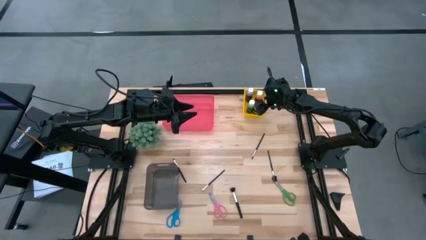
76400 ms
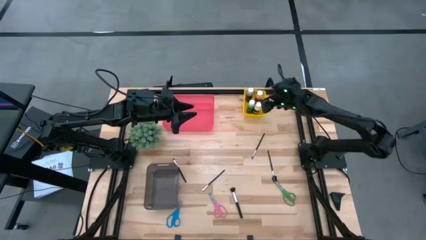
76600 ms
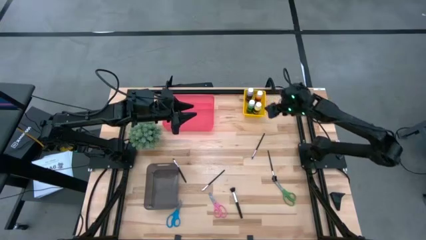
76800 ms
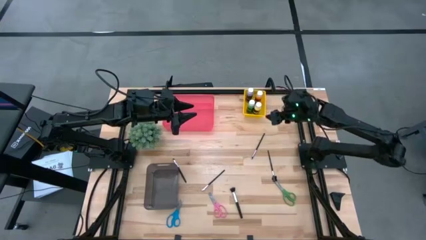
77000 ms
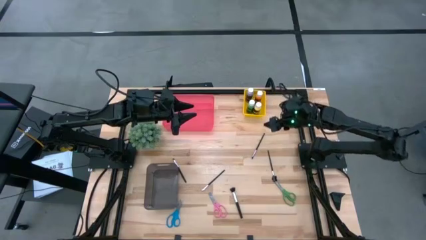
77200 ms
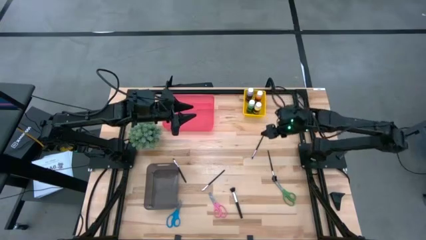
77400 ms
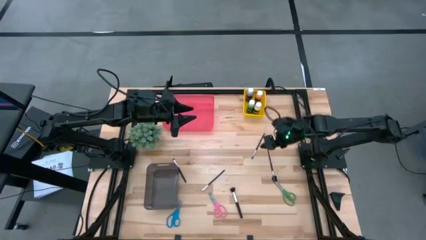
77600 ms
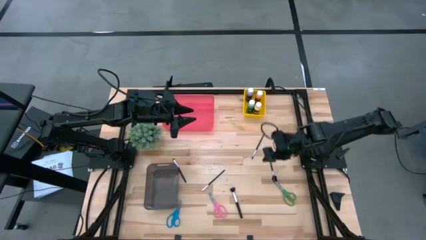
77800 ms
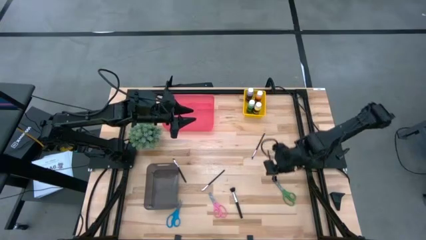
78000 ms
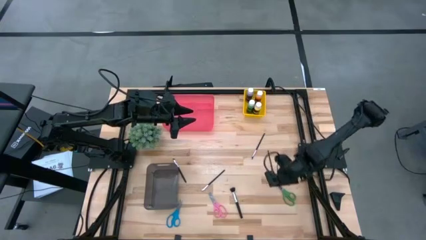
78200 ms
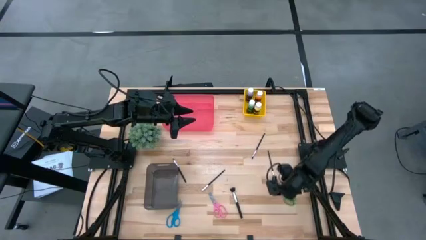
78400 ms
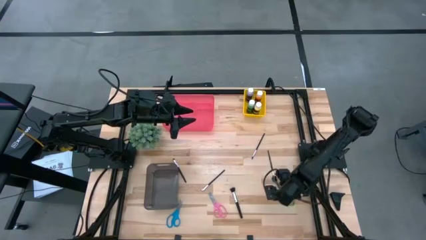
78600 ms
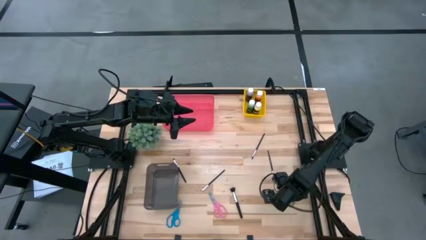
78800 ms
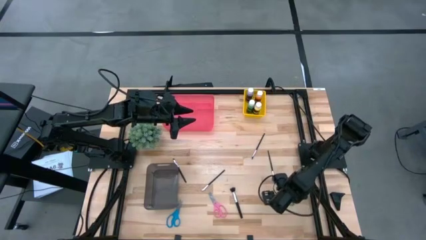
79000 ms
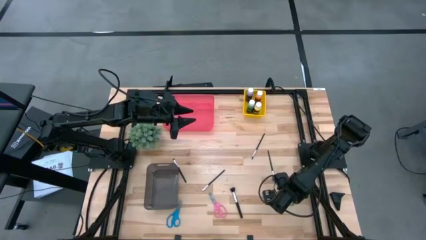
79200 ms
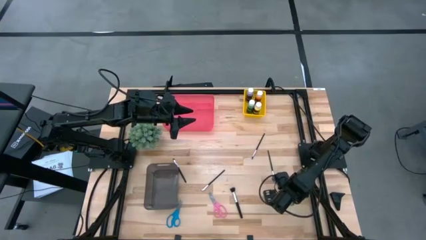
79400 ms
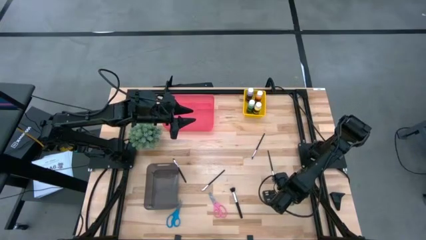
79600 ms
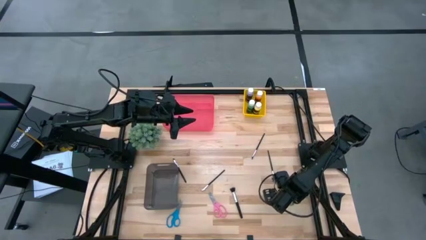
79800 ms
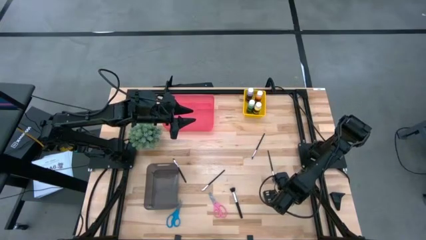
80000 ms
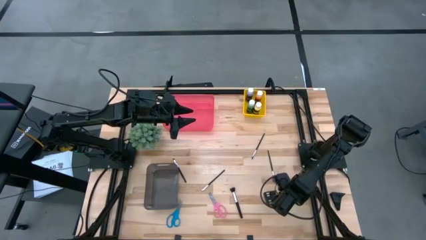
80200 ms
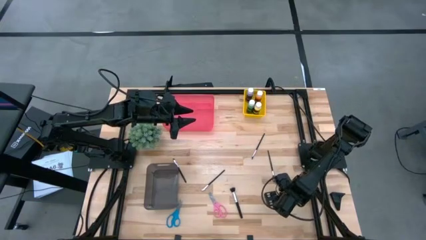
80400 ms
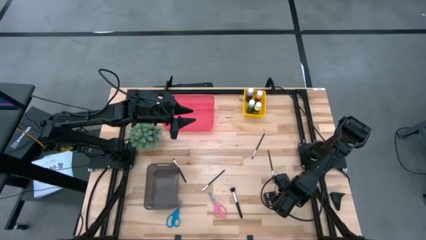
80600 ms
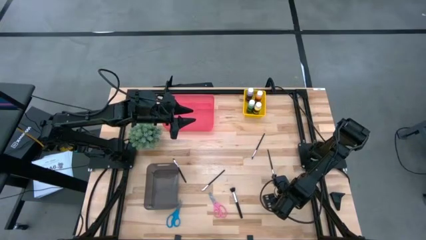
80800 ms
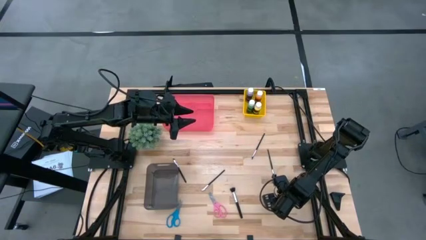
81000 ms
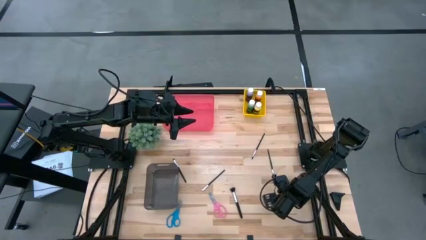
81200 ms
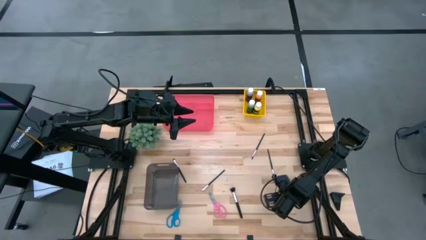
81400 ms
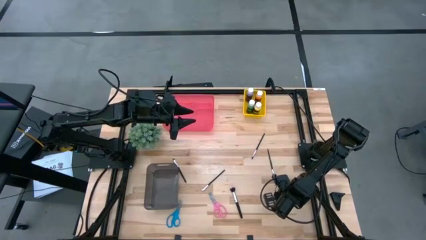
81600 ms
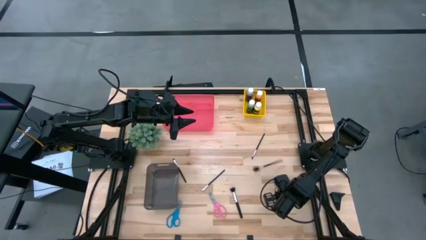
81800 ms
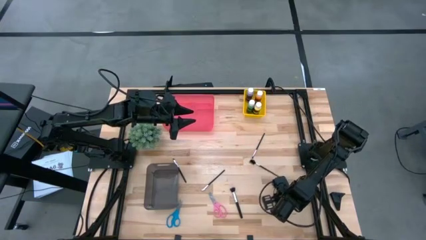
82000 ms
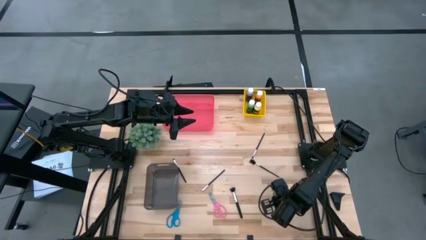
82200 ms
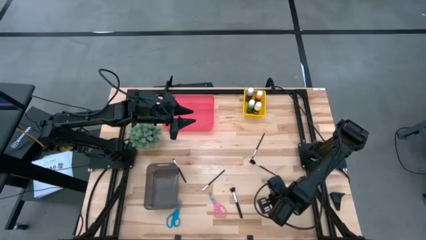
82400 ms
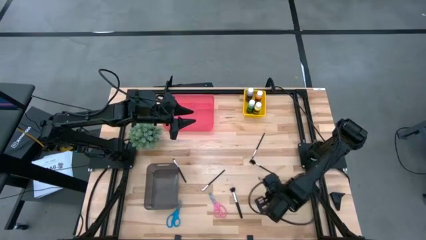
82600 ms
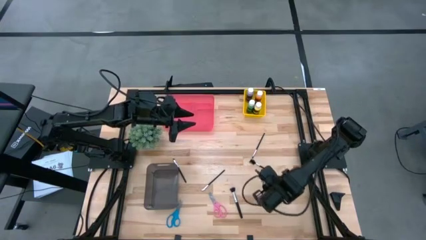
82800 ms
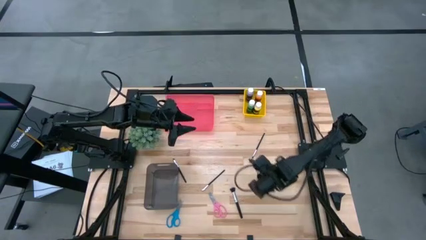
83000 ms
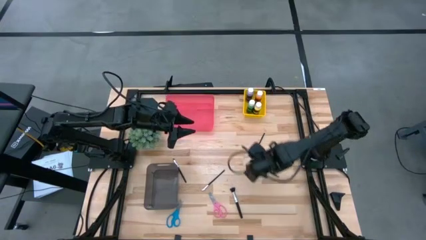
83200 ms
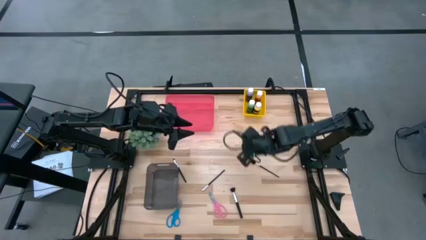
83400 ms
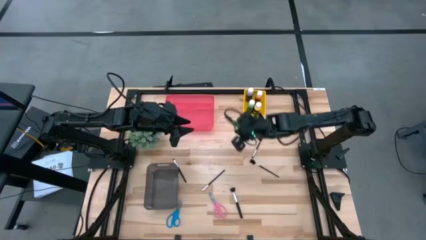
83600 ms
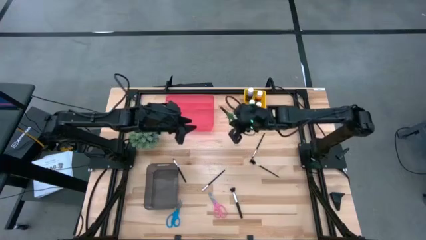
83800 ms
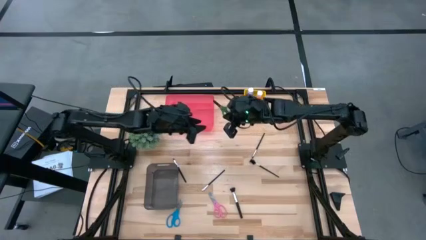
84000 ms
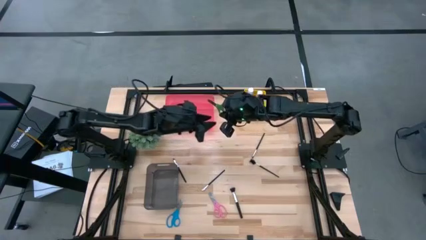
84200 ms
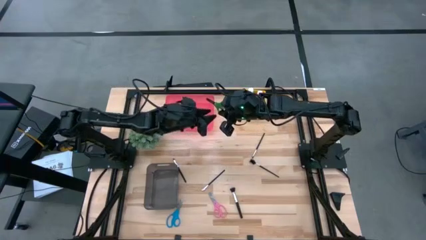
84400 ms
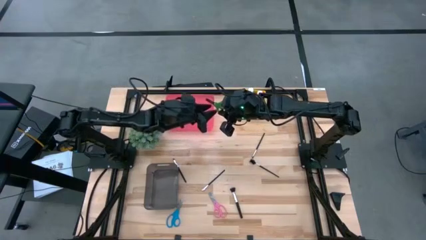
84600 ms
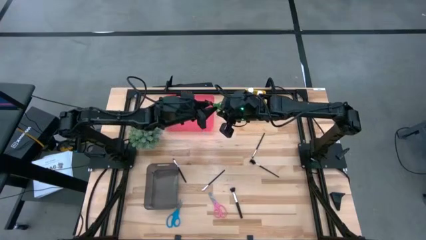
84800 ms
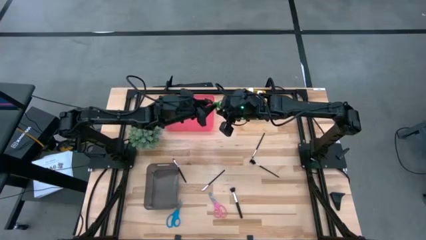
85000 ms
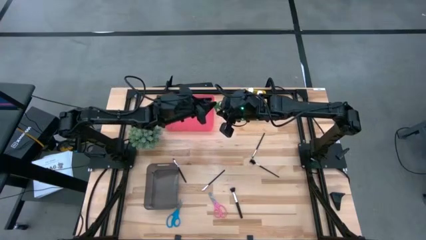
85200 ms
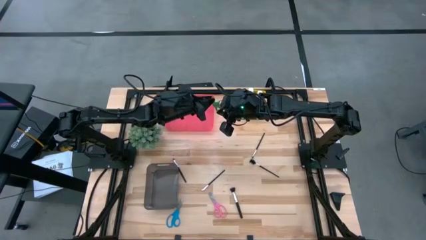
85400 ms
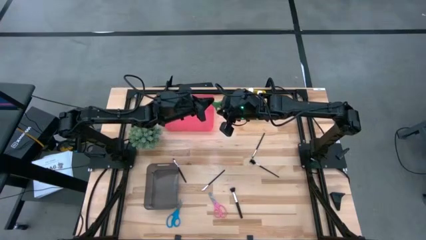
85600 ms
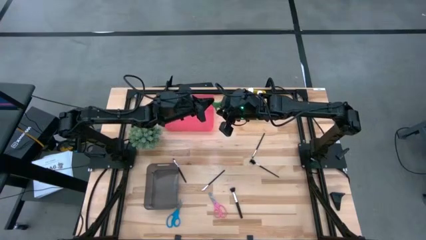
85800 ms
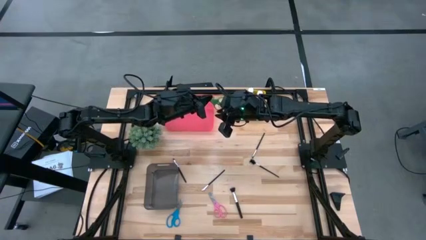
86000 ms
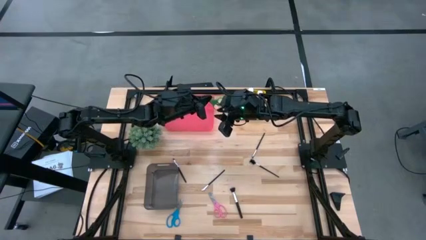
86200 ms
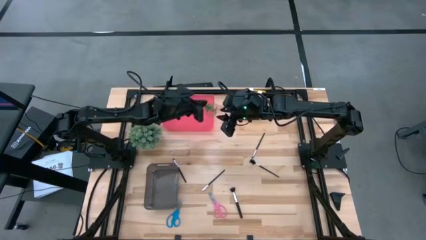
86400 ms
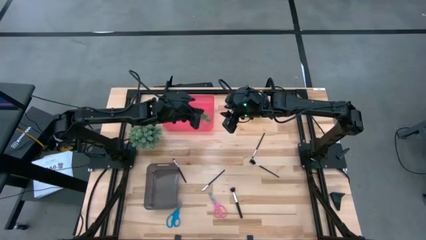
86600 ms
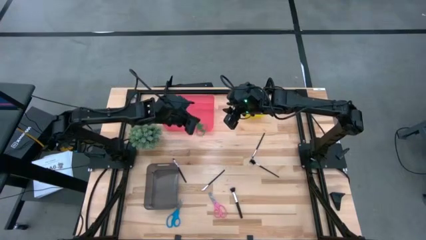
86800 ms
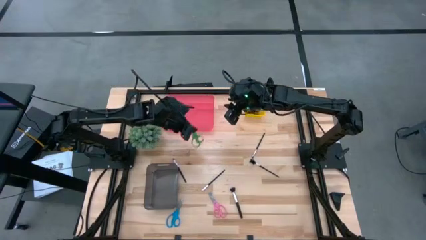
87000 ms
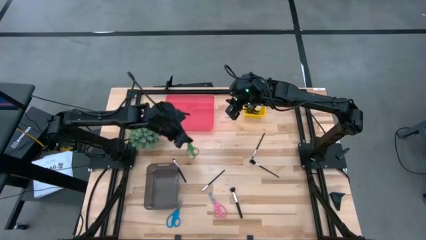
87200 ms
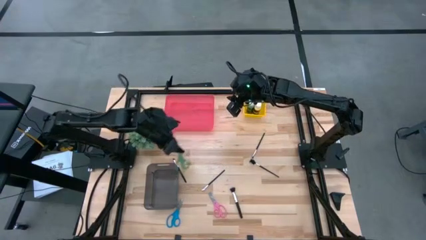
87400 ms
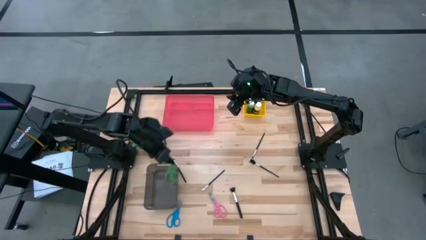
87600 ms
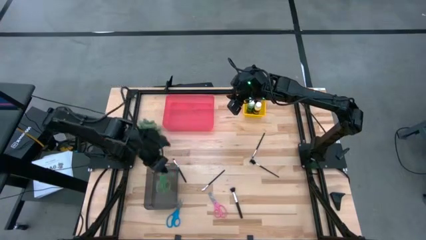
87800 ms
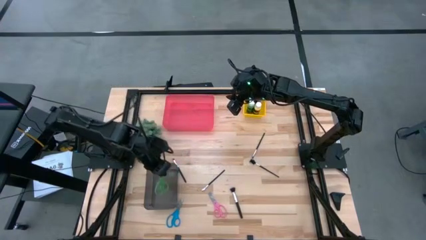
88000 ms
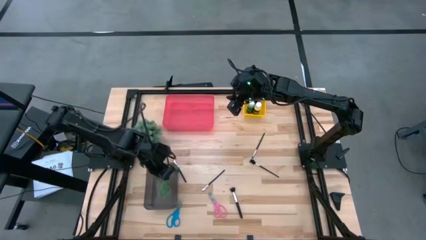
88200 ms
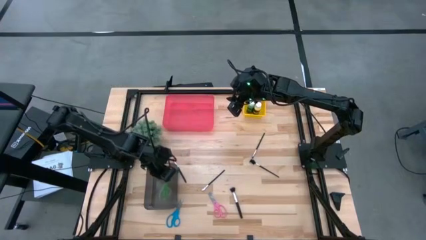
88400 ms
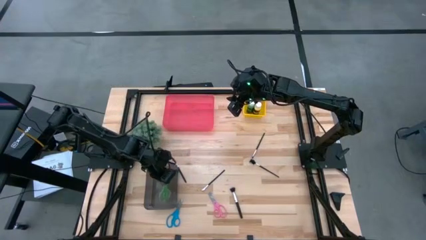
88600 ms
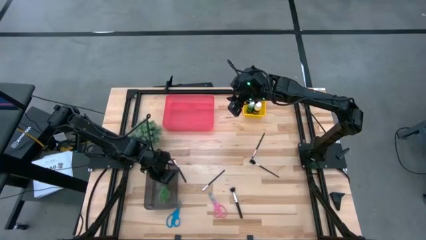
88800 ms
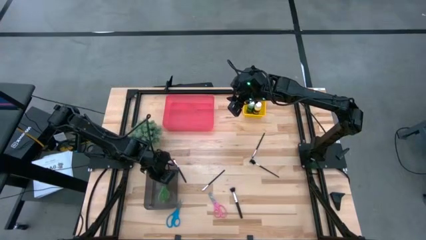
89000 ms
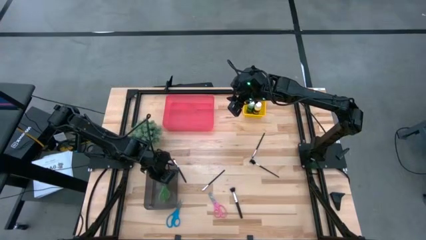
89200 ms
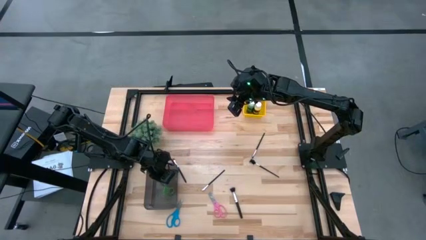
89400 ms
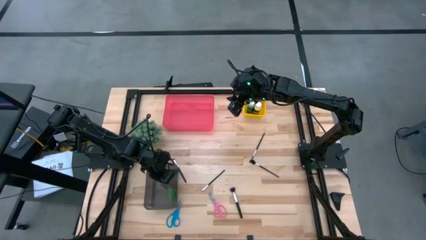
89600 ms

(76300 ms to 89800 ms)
Task: Pick & Place Paint Supplies
Put the green scissors into the black bin

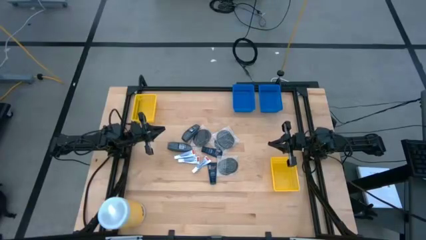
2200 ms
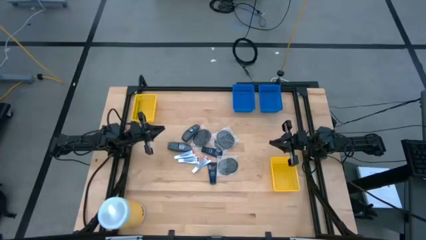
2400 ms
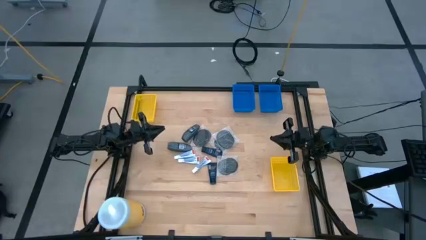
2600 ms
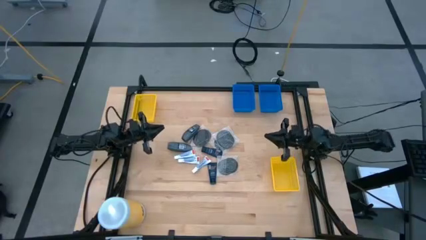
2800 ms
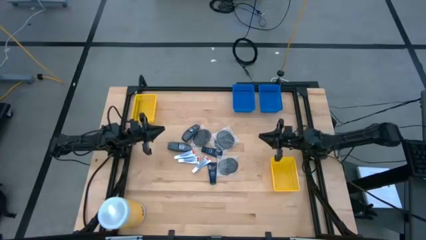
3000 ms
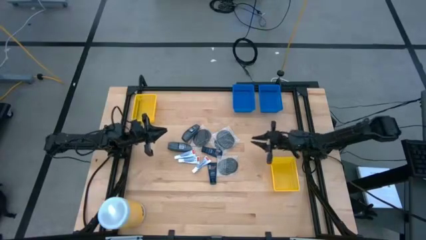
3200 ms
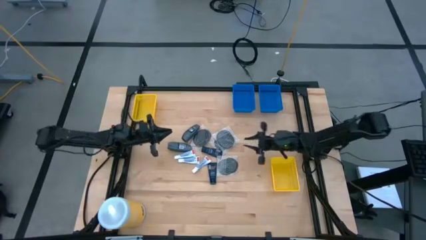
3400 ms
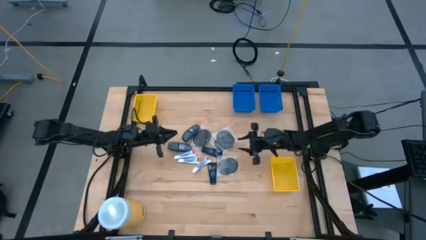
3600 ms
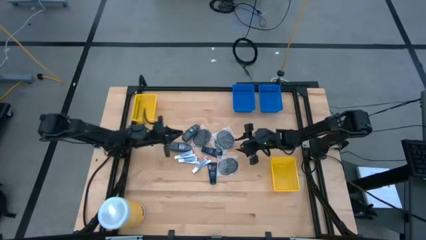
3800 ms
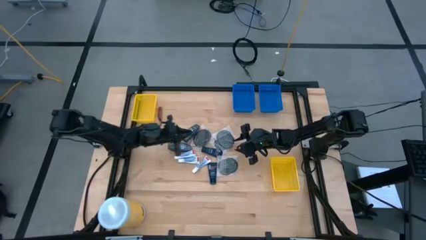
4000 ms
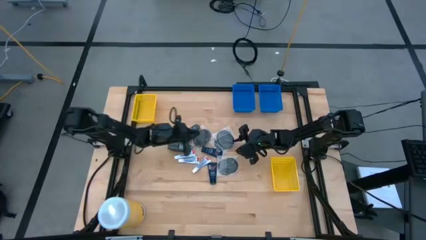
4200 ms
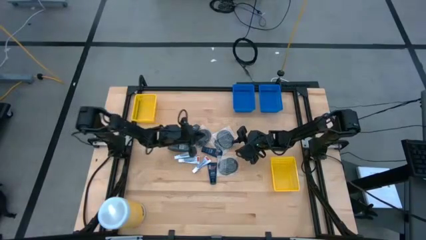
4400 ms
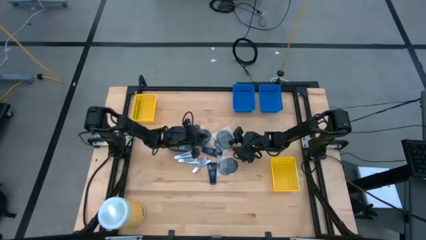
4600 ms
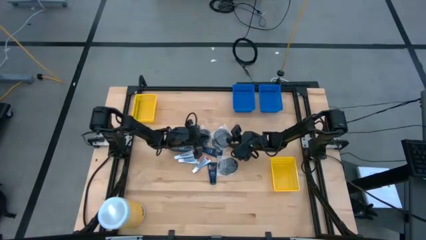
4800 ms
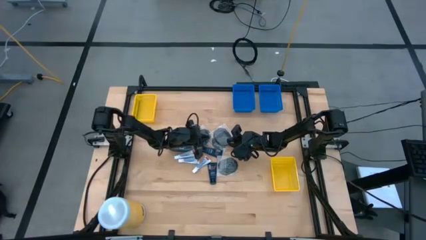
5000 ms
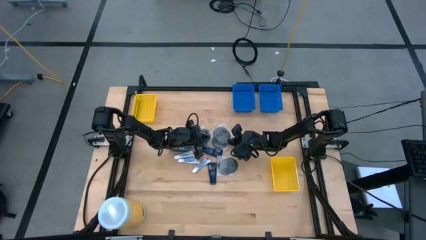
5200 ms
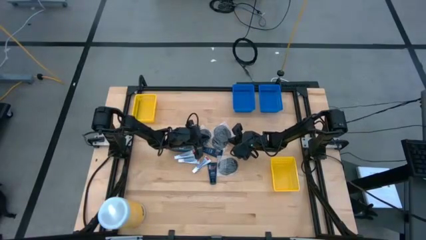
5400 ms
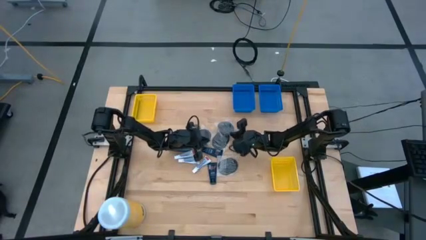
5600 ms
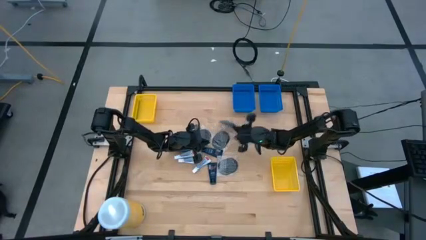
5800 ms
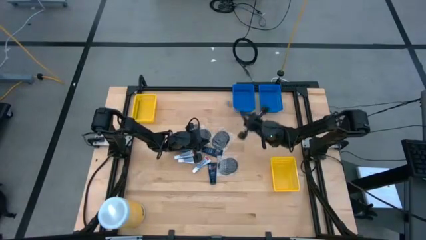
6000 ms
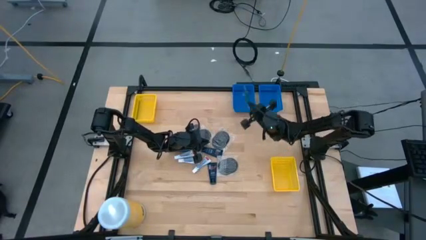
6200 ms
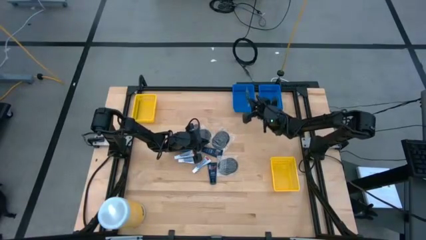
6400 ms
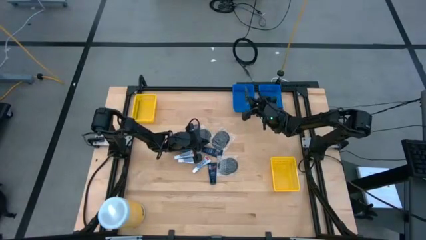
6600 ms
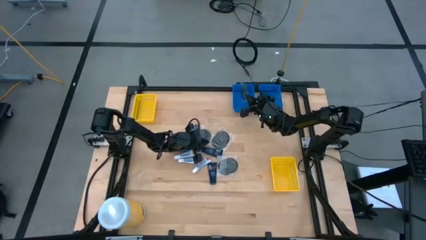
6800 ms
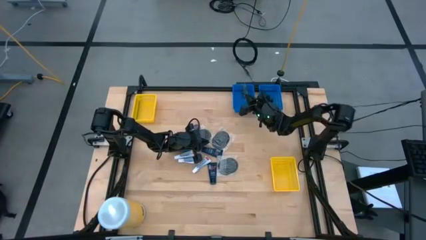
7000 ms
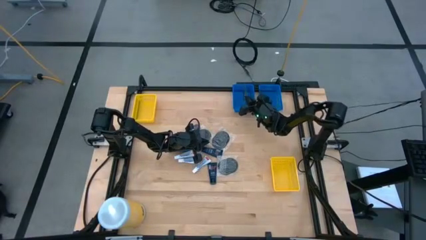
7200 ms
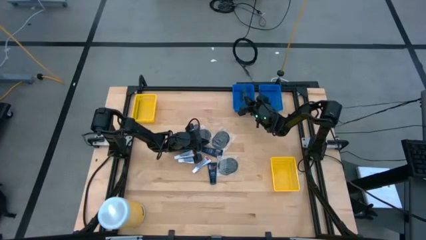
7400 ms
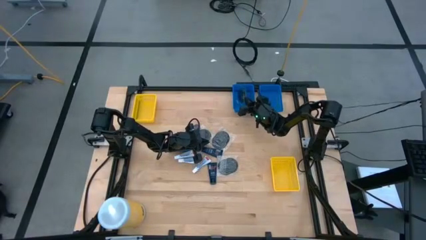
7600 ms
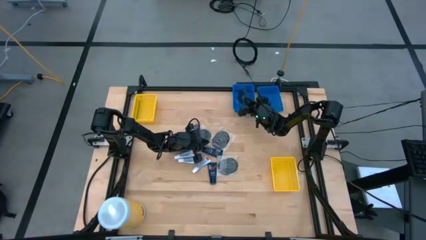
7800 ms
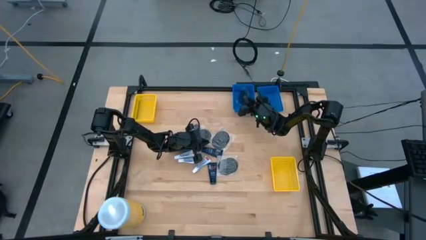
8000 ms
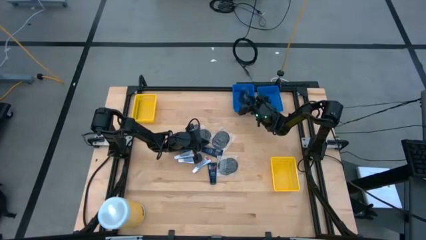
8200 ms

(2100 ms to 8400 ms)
Task: Pick & Place Travel size toiletries
Put the black hairbrush into the left blue bin
